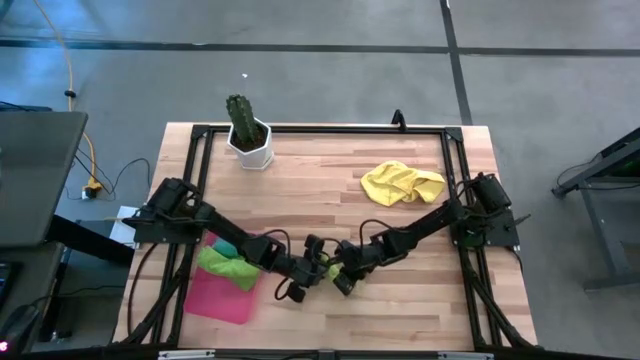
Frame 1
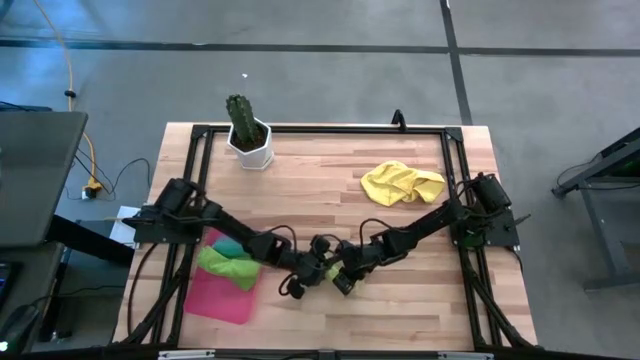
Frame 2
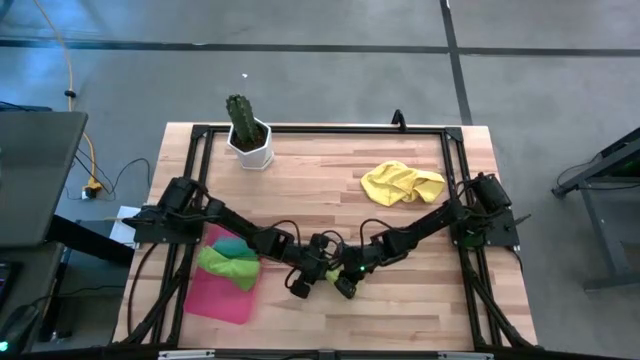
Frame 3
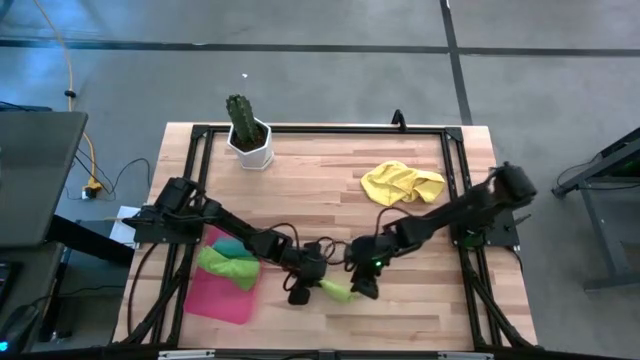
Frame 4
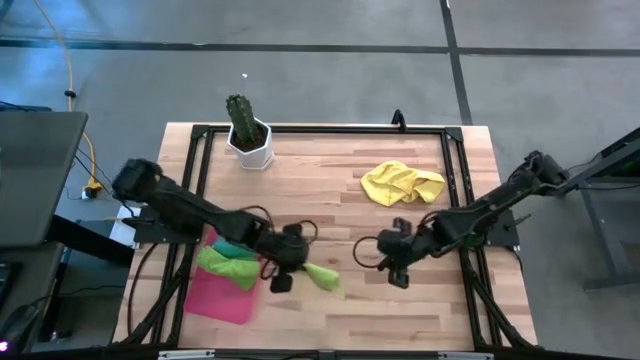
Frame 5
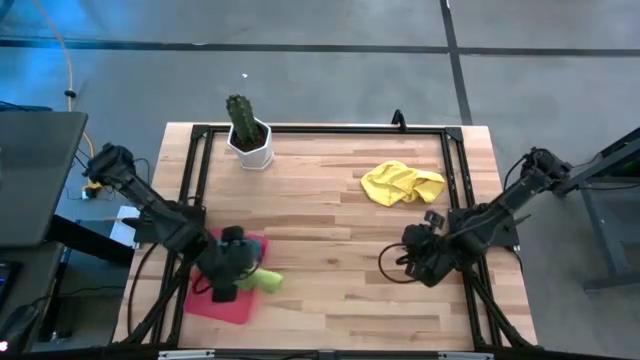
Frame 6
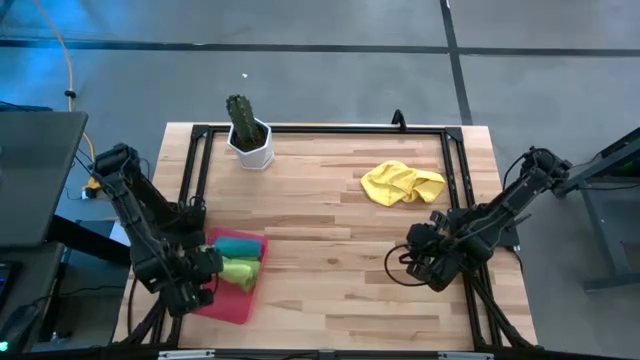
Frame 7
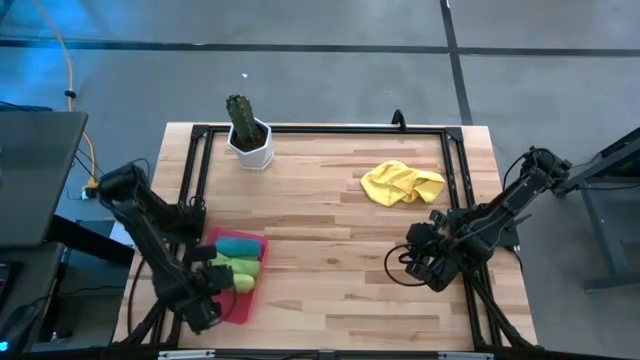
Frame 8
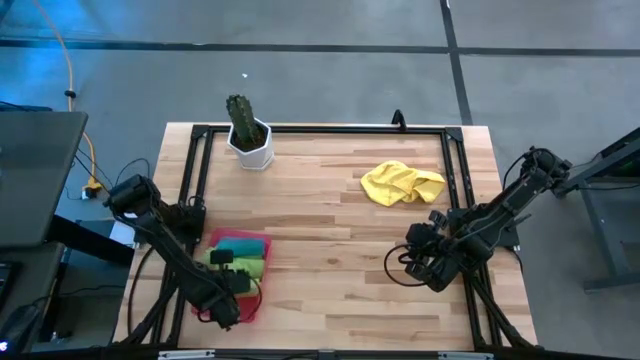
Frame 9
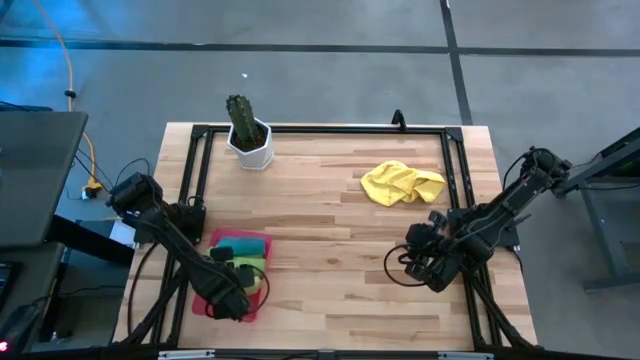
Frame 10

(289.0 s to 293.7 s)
Task: Roll microfiber towels into tight, uniform cylinder then place into a basket
Put the rolled light green towel into the red bin

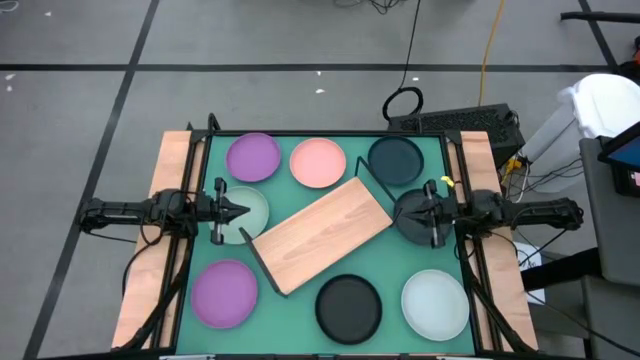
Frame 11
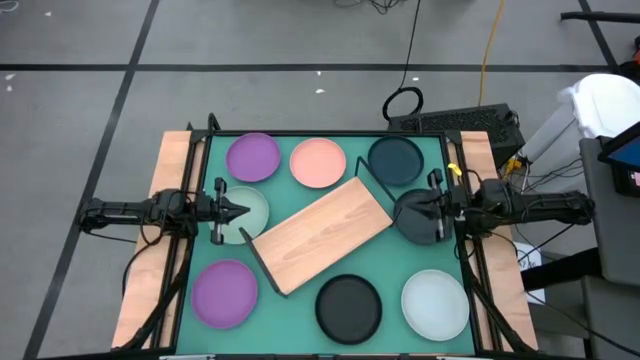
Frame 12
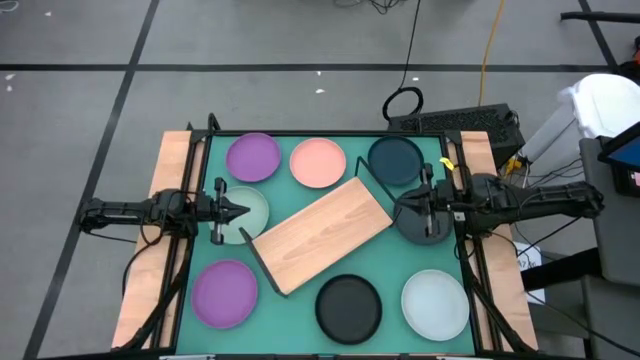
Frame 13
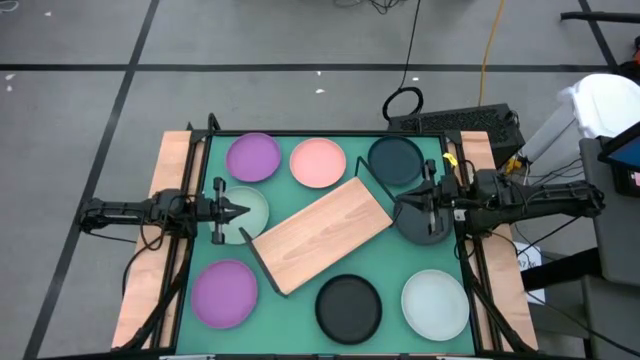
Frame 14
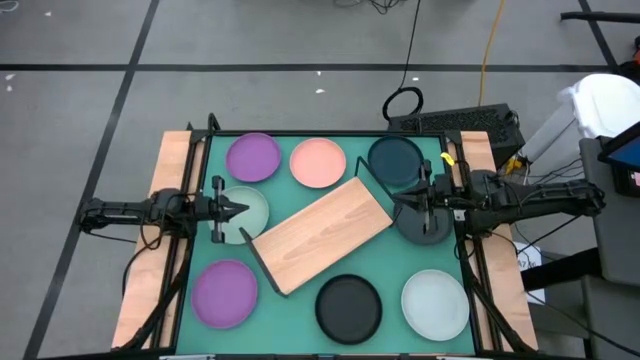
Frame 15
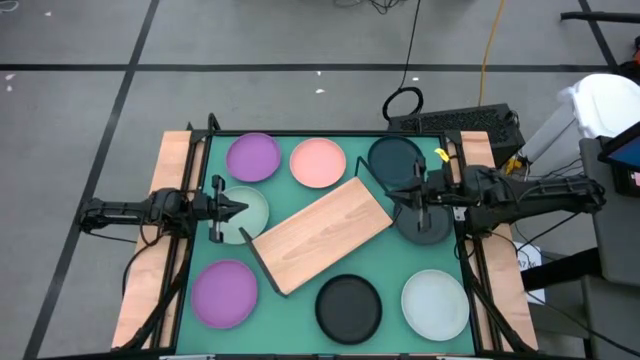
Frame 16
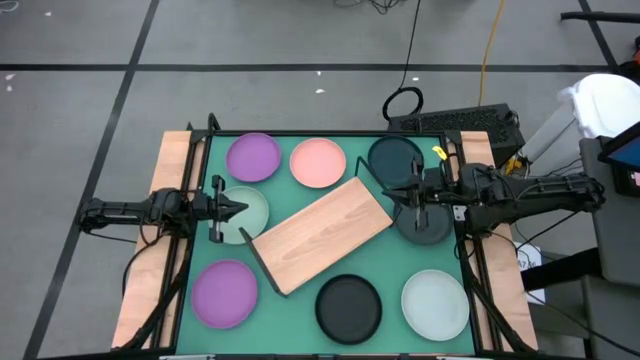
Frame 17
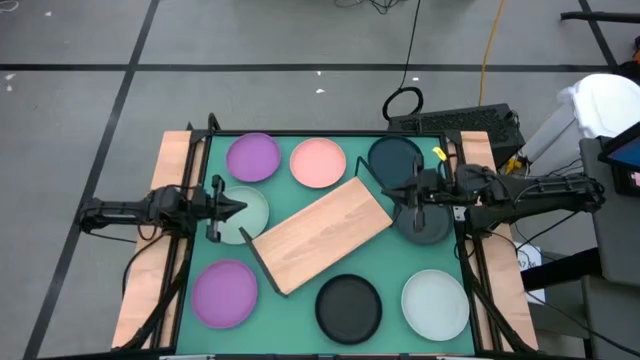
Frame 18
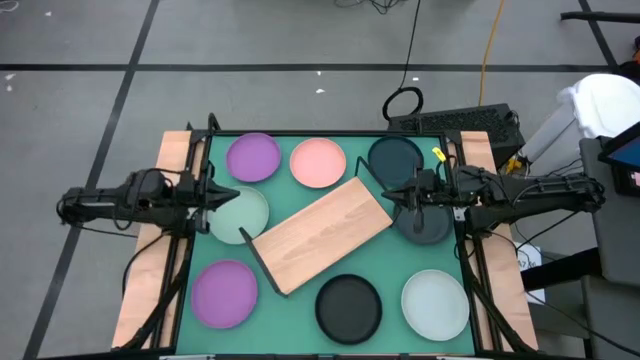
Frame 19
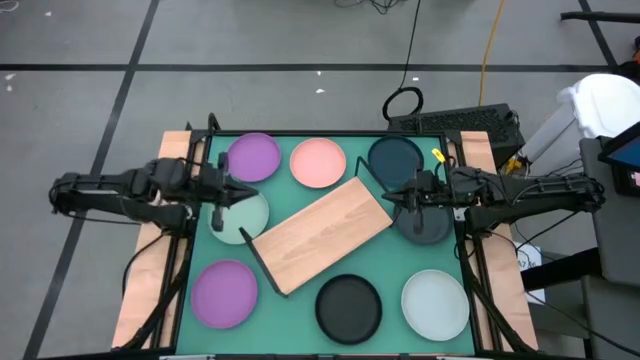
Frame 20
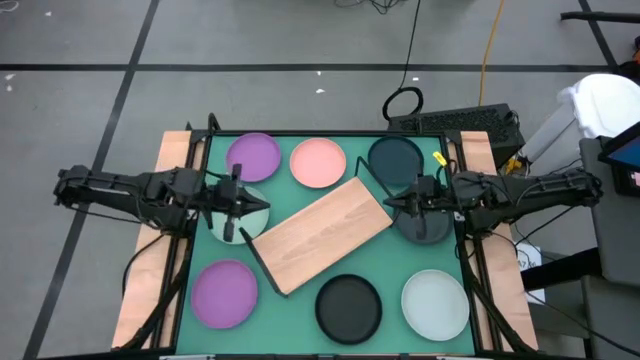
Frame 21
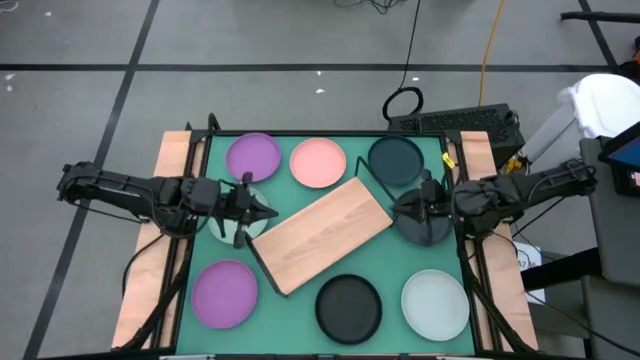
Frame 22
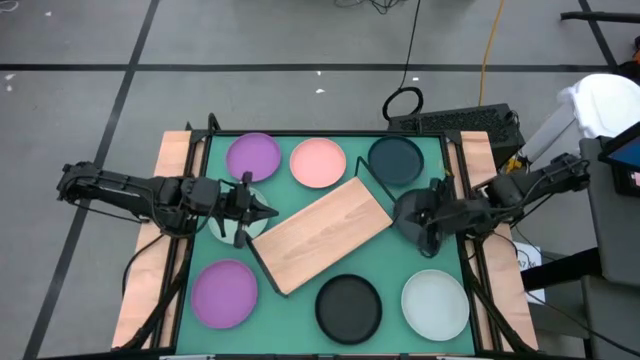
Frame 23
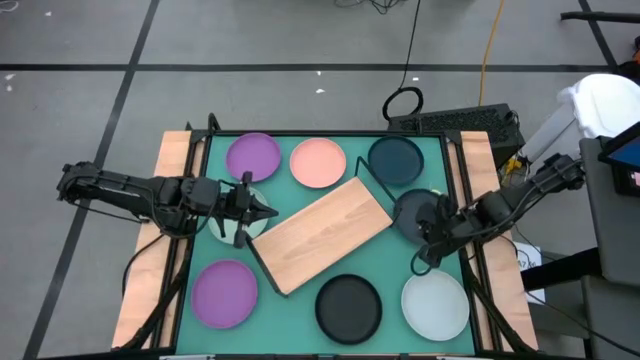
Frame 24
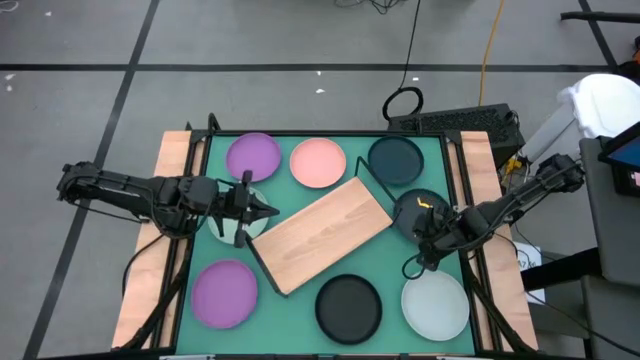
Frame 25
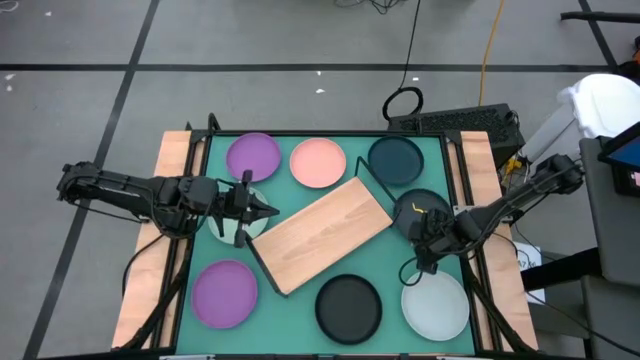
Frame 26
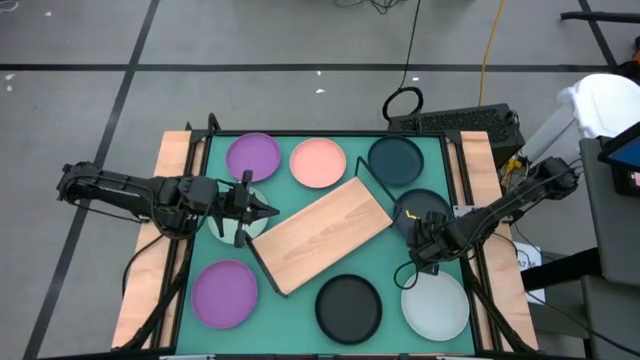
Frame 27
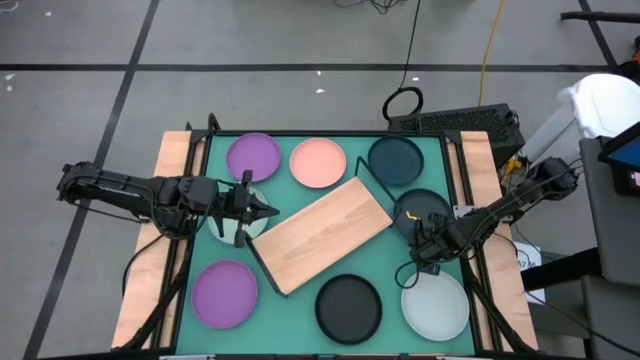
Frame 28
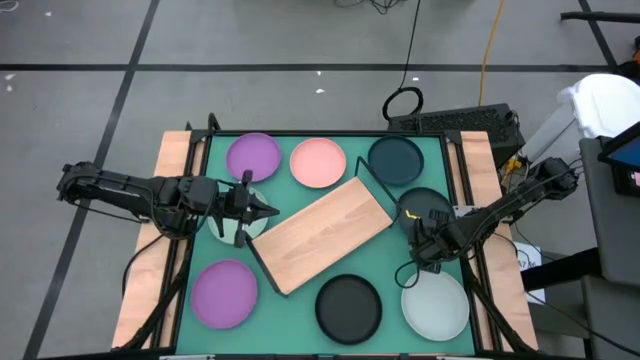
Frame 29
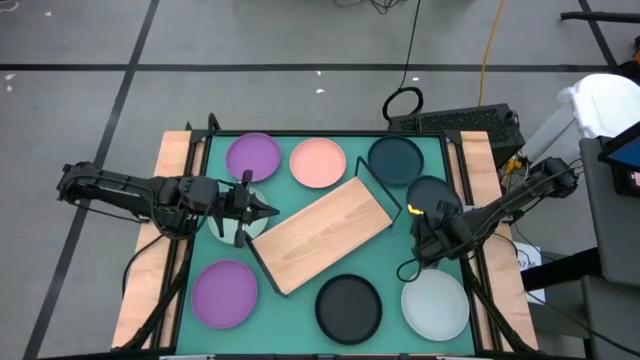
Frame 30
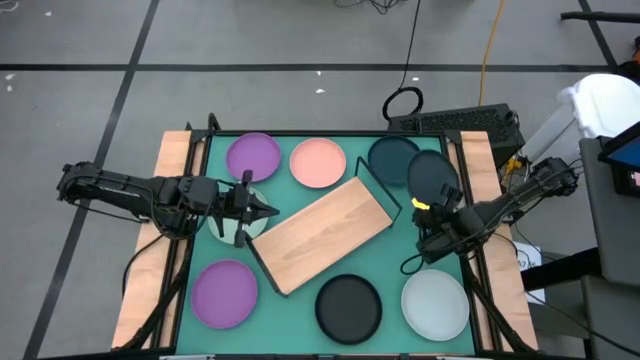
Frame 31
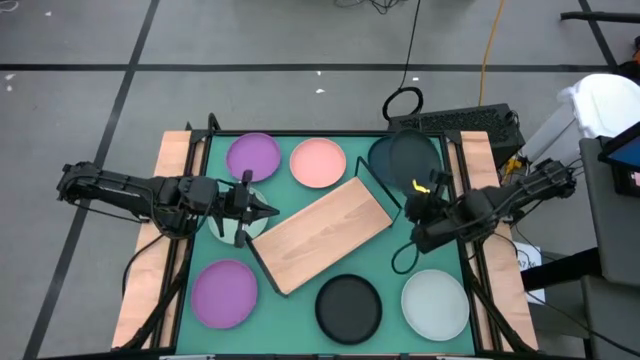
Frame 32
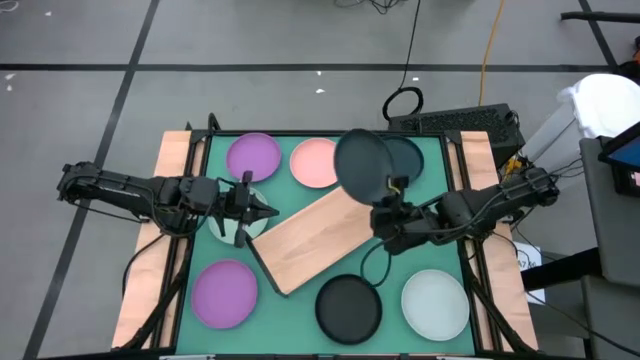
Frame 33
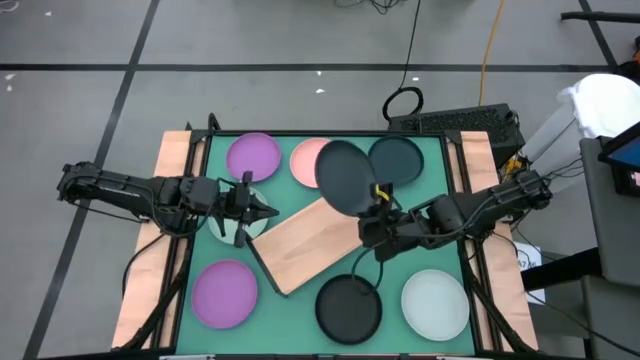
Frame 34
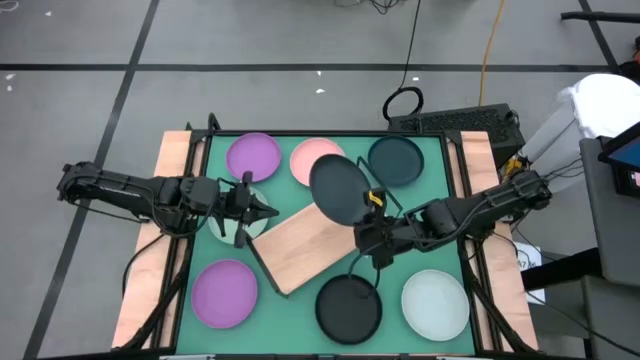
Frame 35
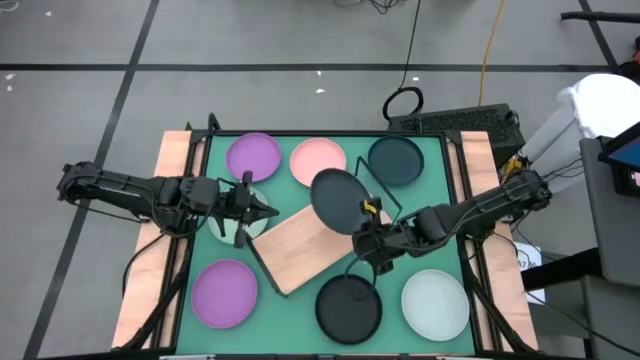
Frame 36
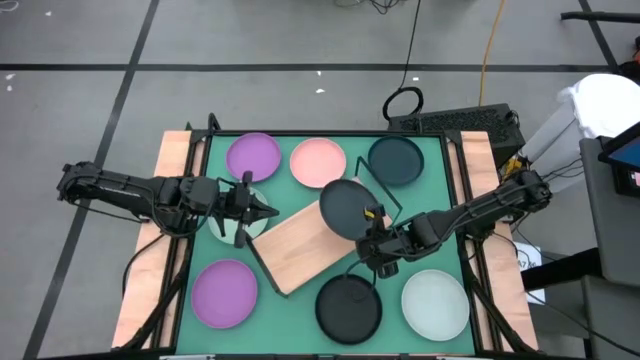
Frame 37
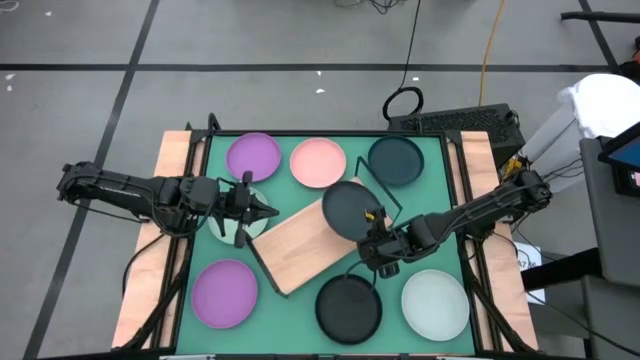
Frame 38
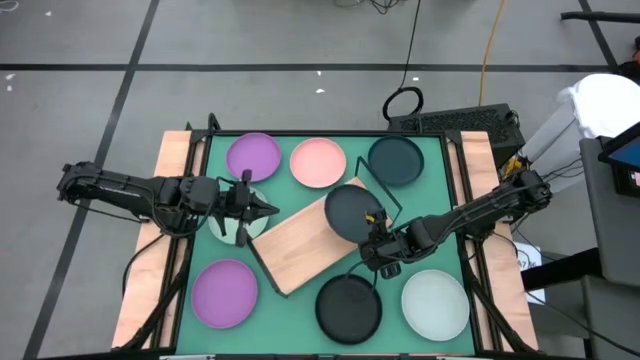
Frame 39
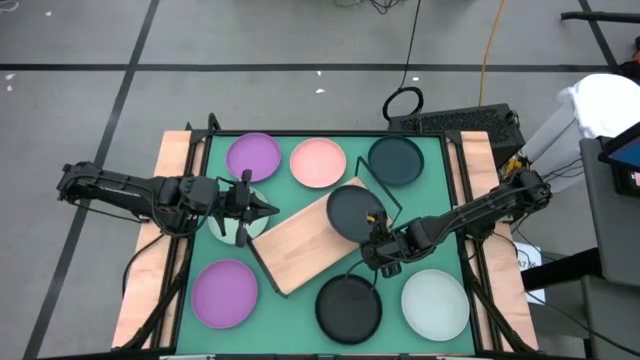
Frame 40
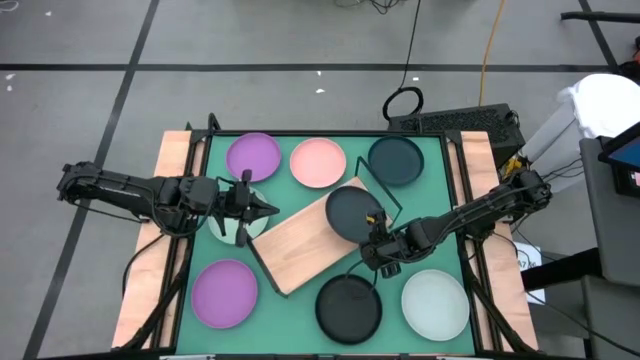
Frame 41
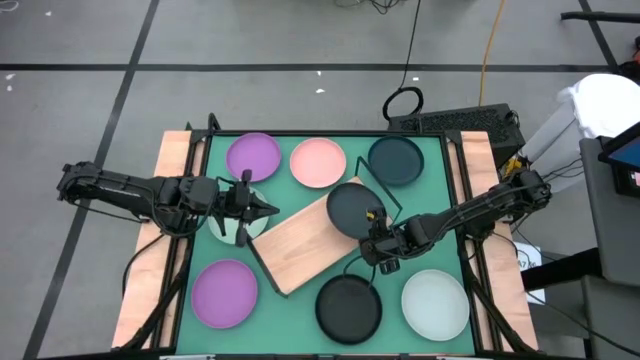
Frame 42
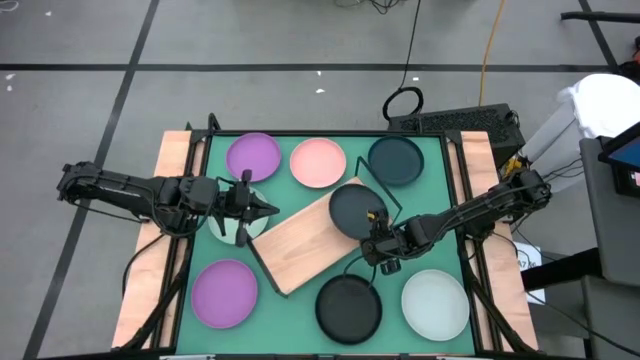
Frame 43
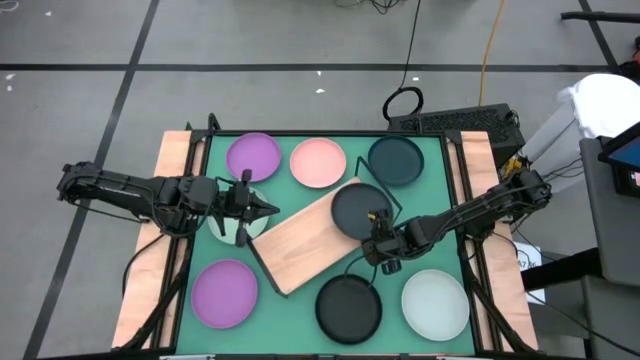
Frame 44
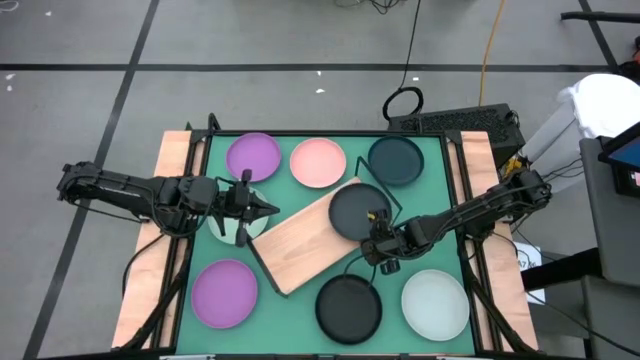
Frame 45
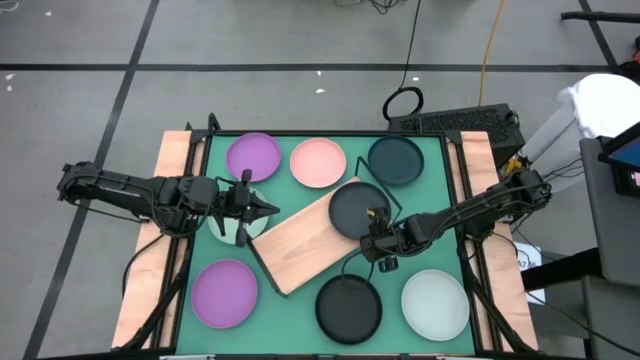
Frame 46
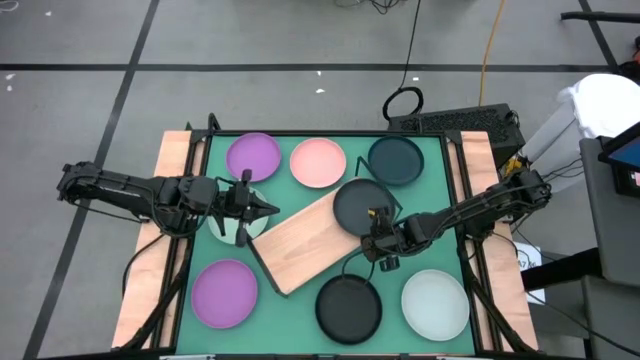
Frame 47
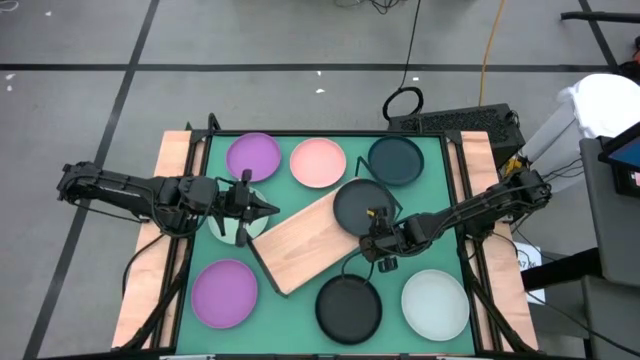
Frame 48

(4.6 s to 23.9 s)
Task: Place and stack plates onto a shelf
Put the top black plate on the shelf
